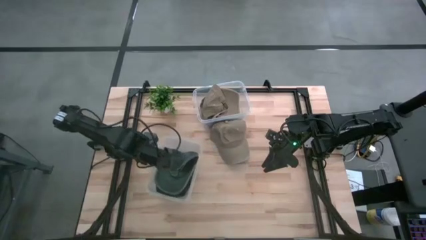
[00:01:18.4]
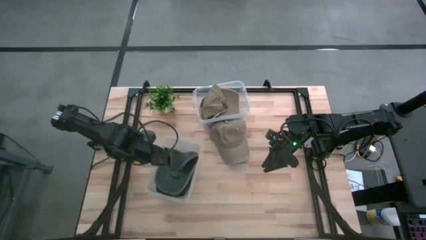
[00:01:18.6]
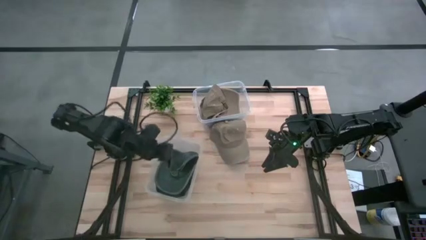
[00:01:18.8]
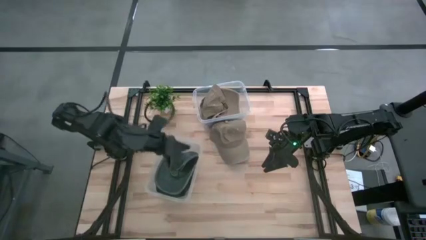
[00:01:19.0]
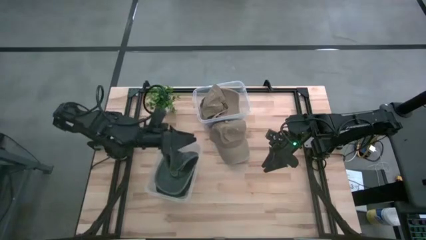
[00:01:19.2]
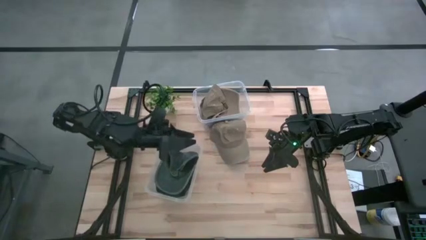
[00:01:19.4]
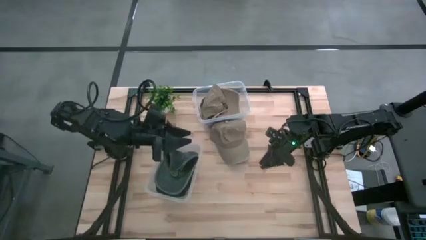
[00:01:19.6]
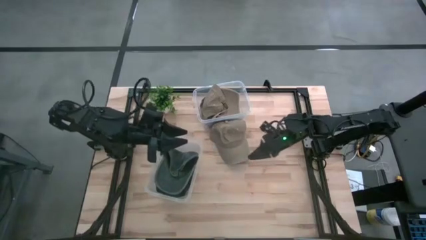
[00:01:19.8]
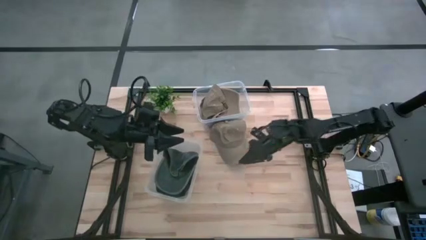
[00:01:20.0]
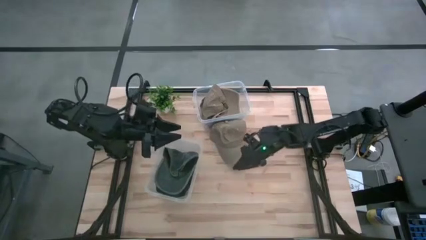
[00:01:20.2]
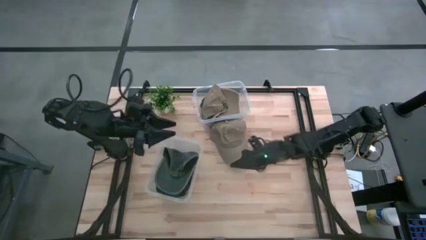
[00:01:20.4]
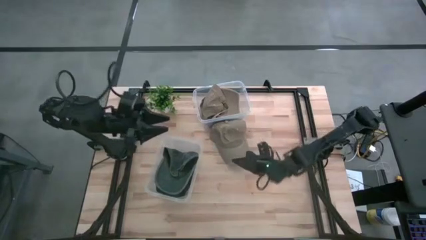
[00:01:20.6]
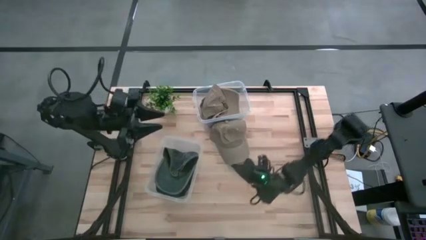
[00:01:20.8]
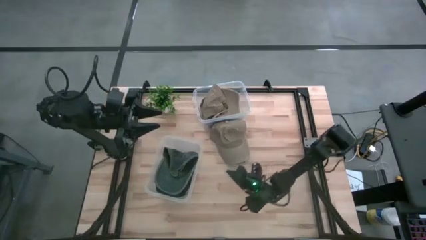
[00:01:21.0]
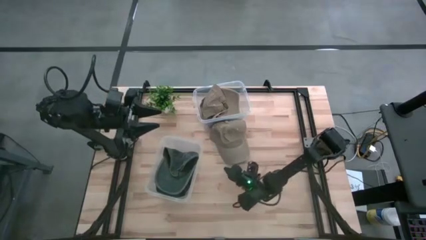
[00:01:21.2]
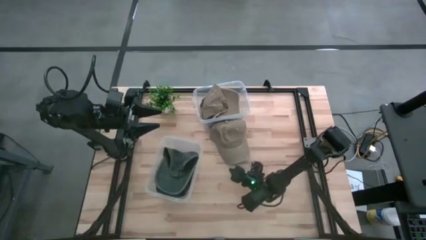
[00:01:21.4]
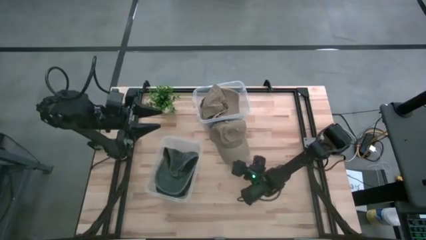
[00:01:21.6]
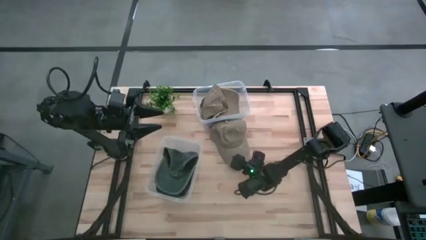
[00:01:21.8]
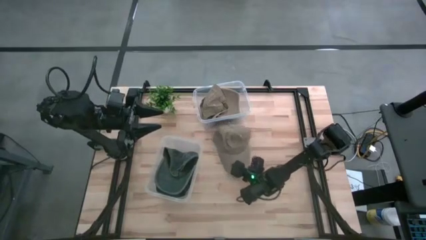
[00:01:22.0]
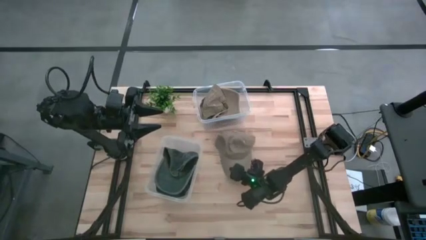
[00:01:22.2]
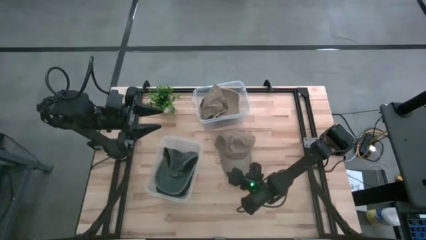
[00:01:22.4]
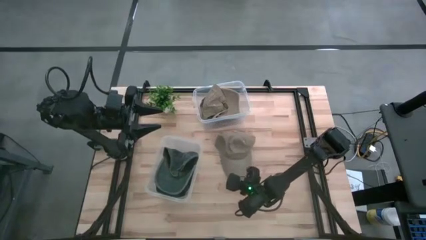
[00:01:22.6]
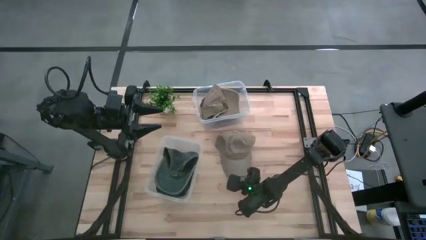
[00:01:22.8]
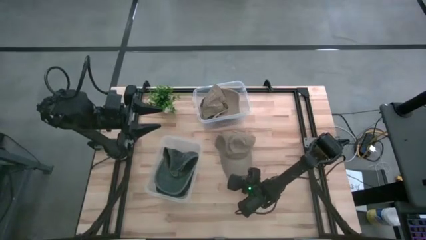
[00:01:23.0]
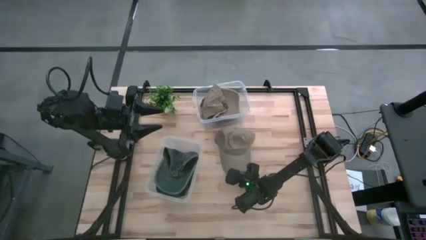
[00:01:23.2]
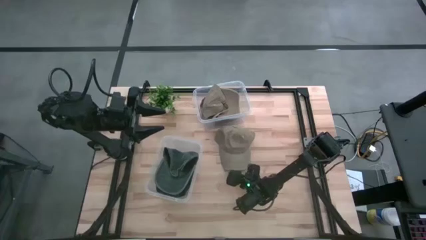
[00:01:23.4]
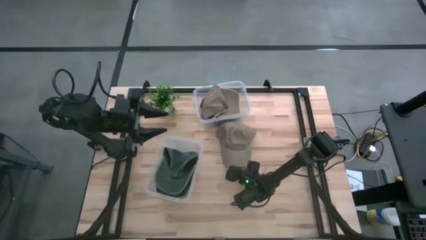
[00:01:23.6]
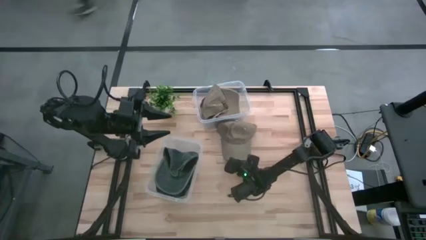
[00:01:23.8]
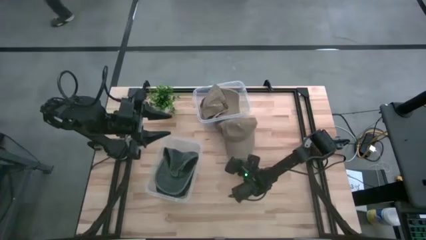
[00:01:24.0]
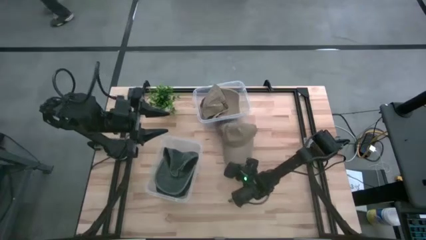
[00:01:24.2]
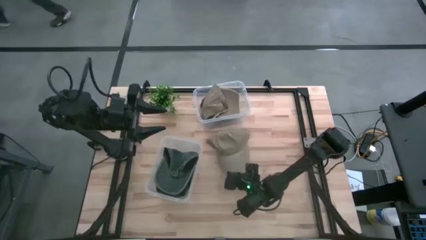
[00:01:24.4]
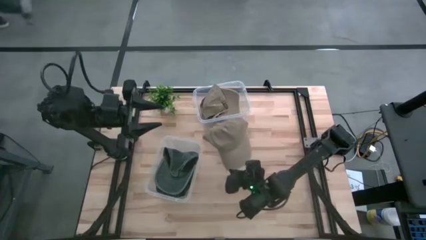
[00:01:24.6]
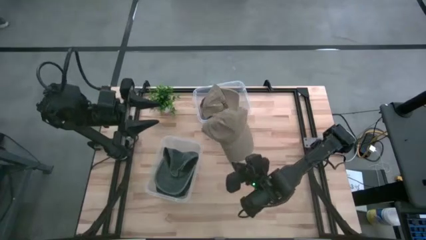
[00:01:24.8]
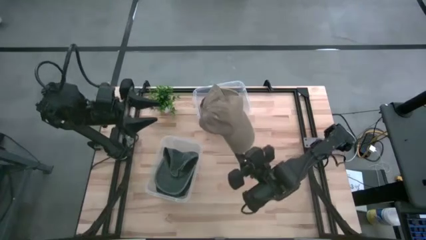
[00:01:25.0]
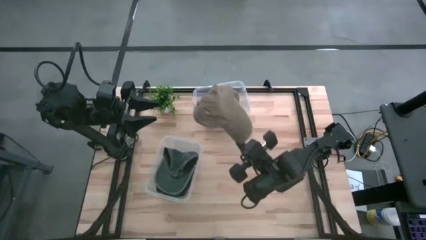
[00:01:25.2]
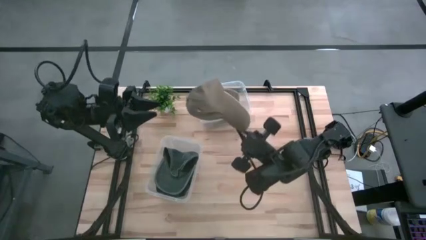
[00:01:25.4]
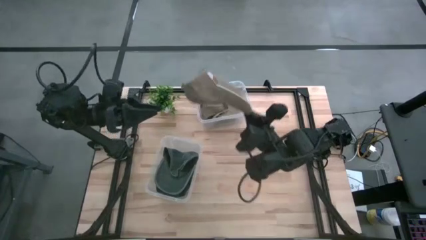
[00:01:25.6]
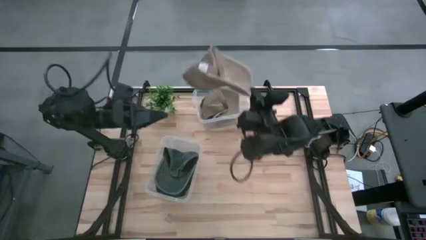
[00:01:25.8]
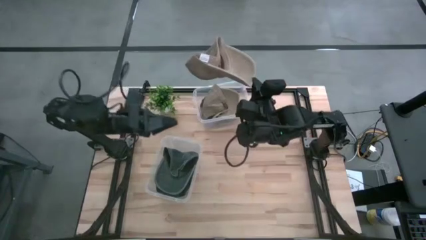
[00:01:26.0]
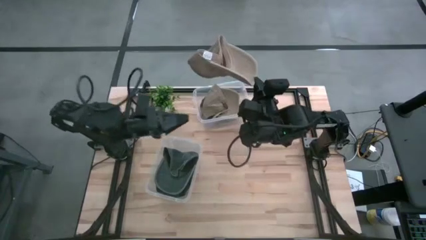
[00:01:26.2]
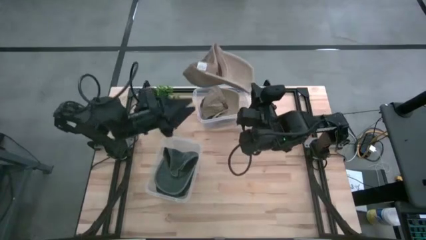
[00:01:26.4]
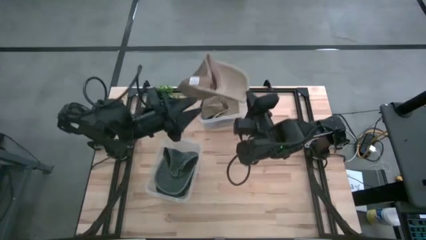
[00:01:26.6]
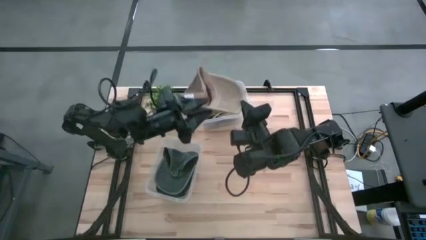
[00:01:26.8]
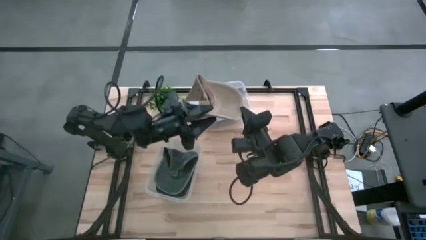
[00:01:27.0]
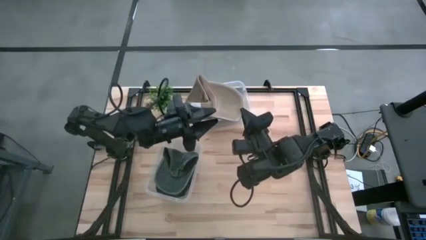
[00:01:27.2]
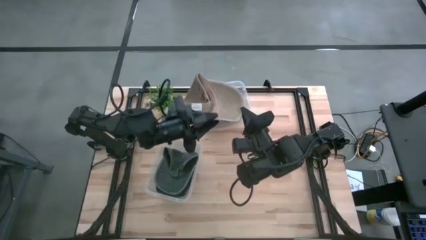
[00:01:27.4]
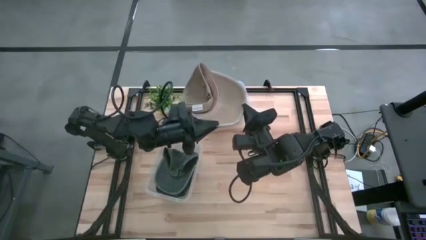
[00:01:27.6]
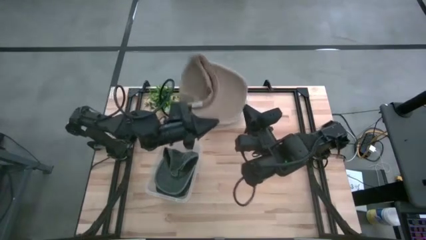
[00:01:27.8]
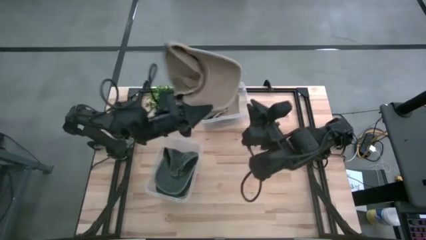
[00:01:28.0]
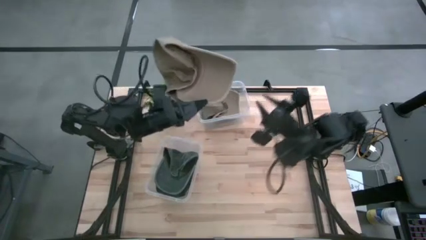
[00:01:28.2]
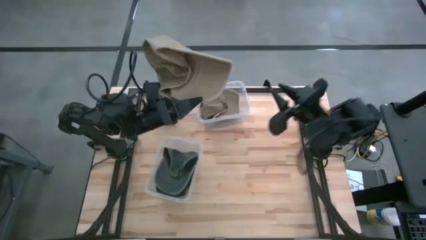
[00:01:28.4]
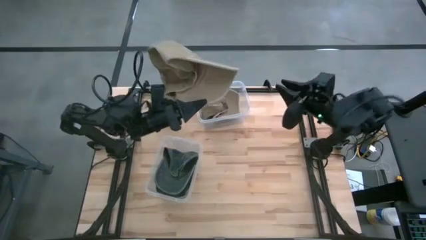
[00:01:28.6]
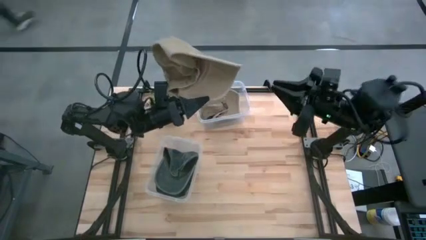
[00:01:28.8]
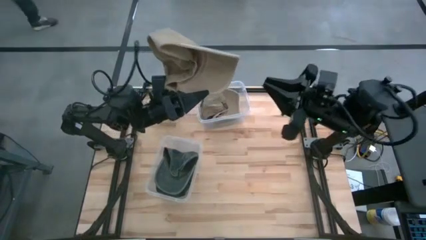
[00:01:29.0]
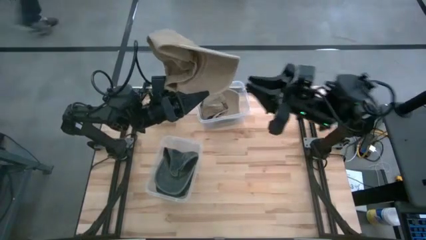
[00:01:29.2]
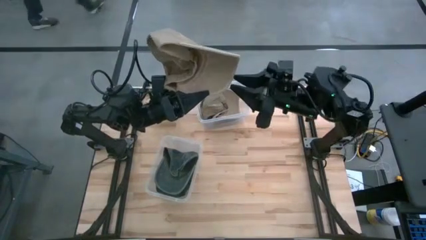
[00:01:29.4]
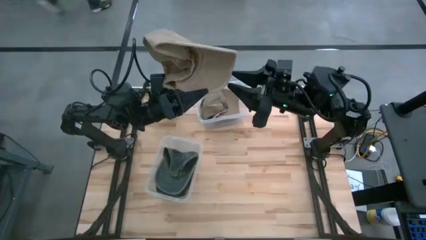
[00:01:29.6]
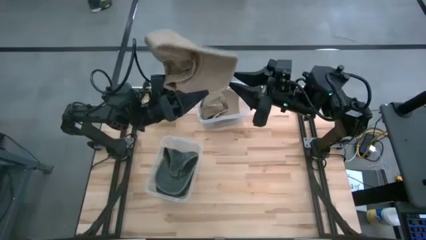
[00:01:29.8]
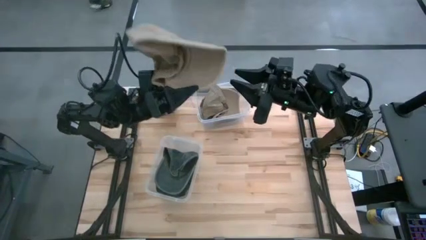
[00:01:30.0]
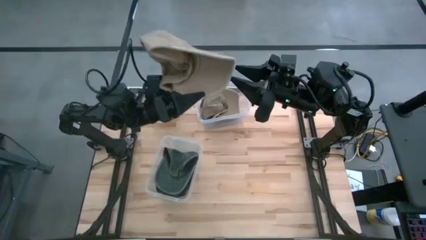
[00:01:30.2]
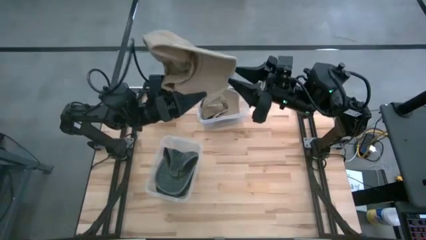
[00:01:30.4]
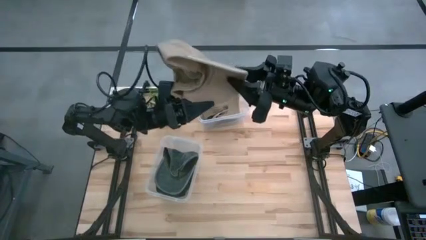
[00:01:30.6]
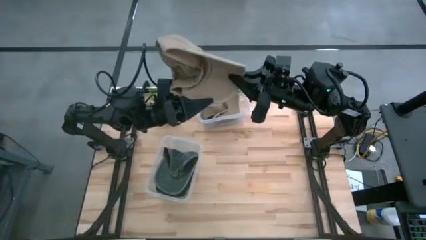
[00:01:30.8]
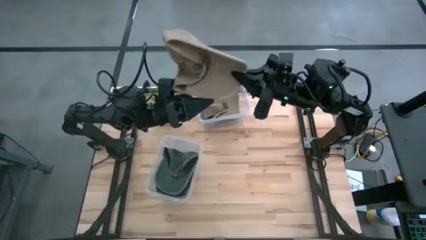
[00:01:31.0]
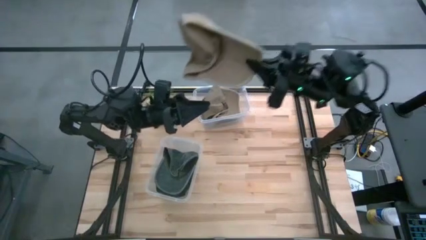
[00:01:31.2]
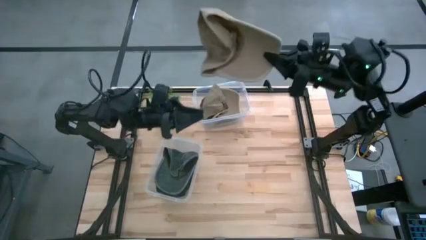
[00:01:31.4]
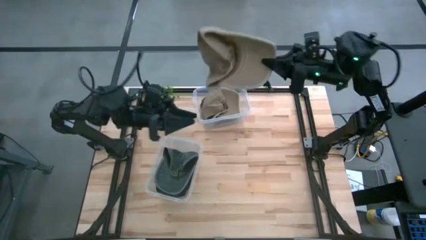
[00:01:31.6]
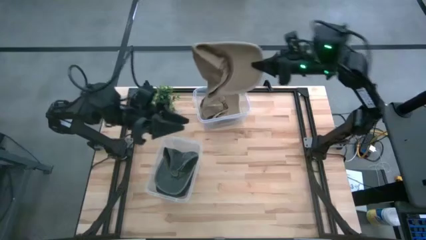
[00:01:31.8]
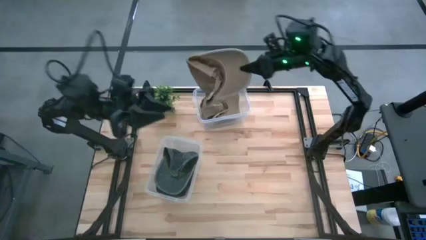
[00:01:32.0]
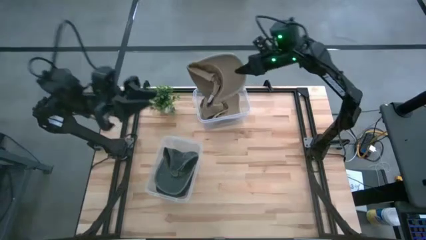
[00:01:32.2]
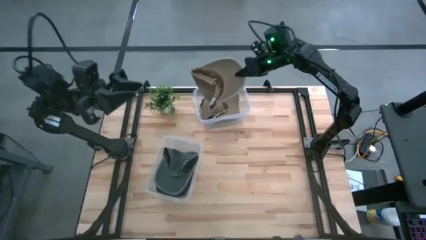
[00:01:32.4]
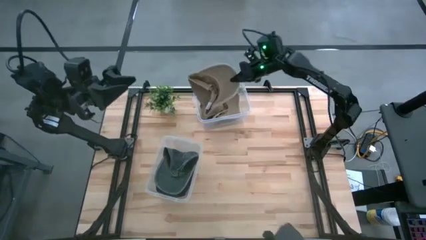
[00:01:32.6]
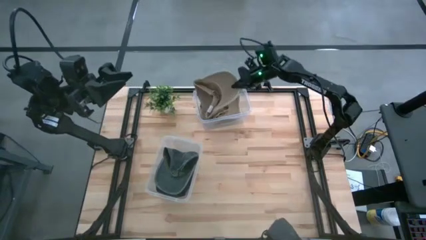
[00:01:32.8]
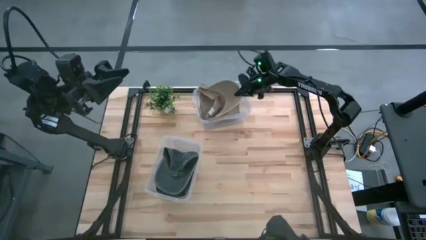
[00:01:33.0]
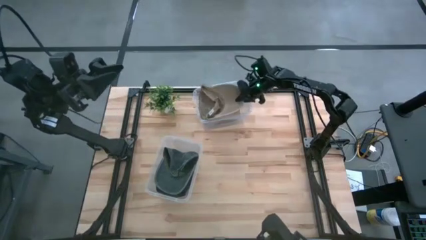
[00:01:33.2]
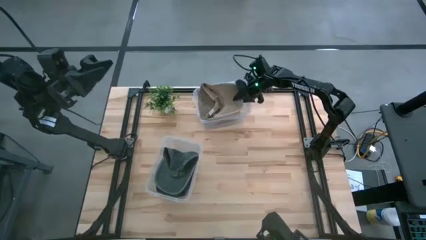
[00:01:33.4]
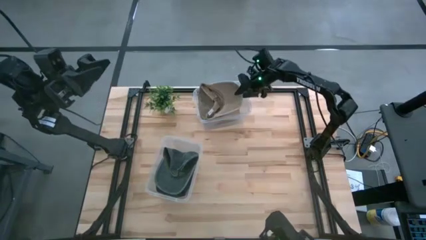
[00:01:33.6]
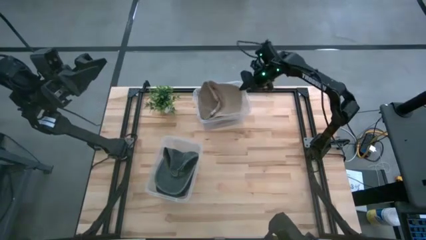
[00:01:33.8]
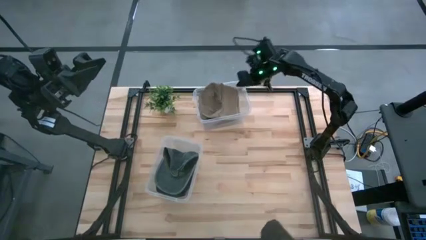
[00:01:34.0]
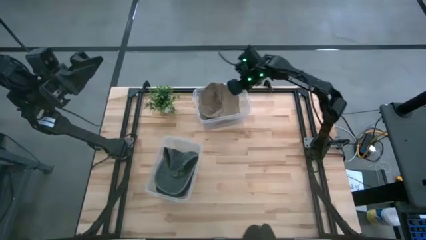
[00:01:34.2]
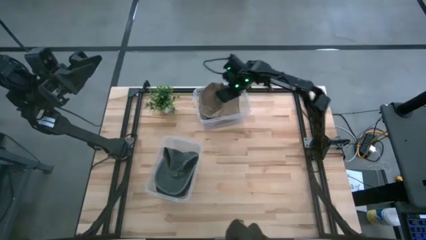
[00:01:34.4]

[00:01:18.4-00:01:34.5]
Task: Pick & Place hat
Put the brown cap into the top transparent container
